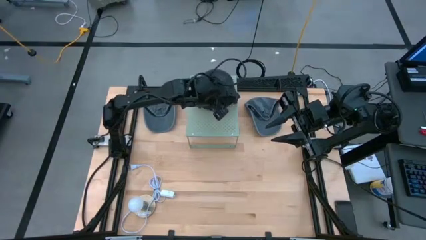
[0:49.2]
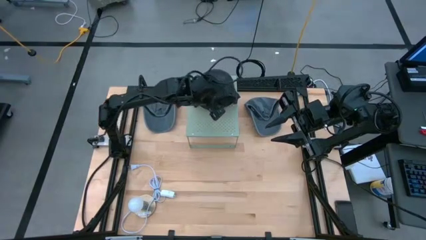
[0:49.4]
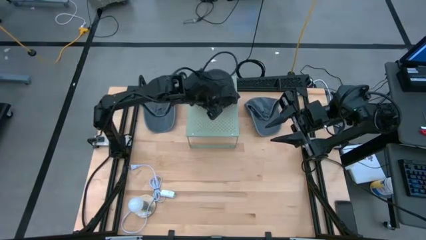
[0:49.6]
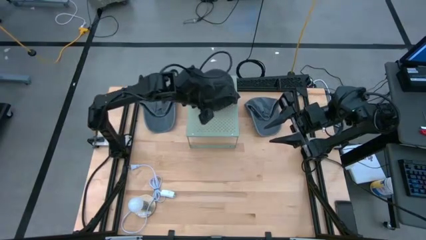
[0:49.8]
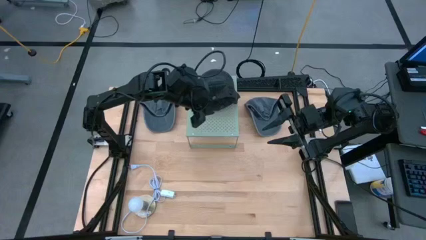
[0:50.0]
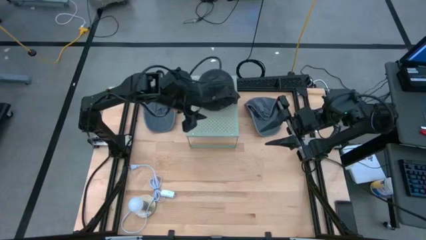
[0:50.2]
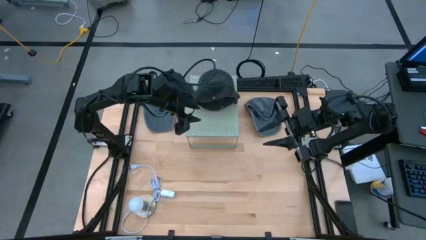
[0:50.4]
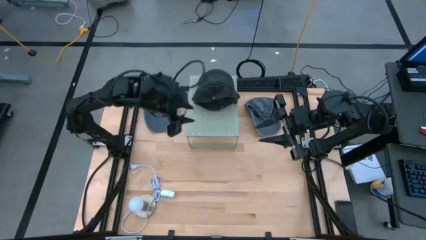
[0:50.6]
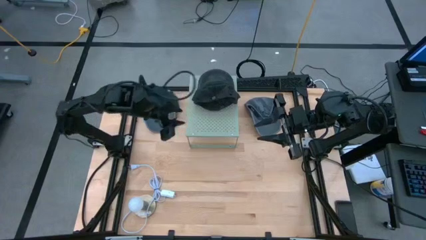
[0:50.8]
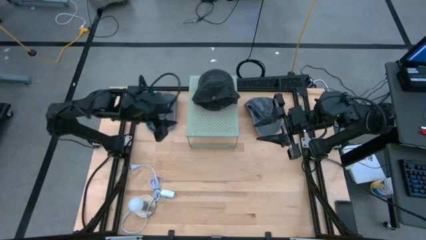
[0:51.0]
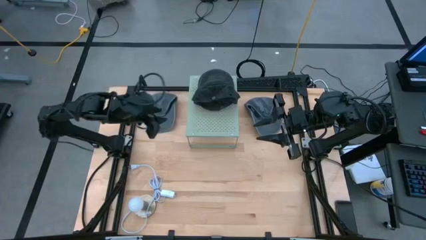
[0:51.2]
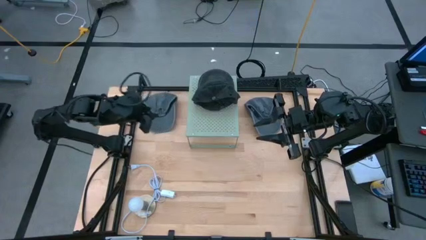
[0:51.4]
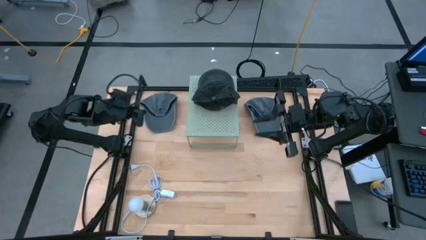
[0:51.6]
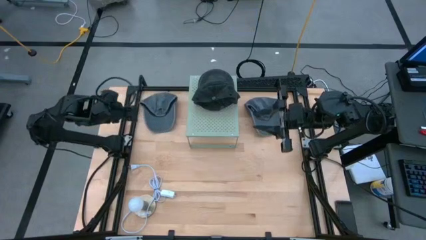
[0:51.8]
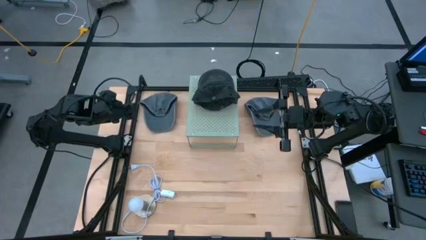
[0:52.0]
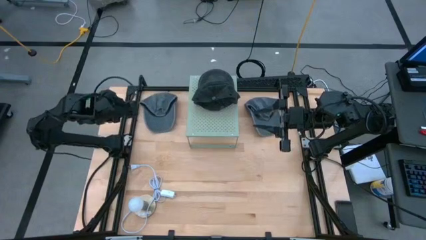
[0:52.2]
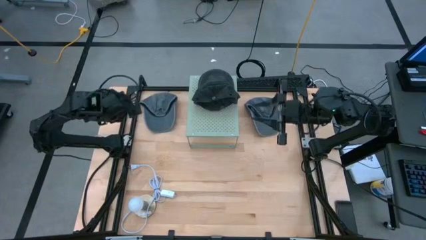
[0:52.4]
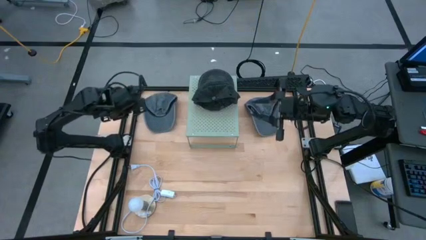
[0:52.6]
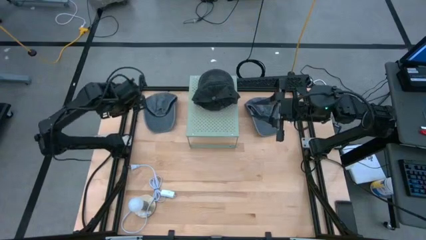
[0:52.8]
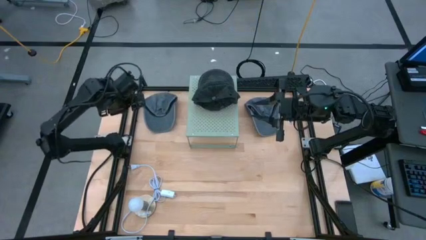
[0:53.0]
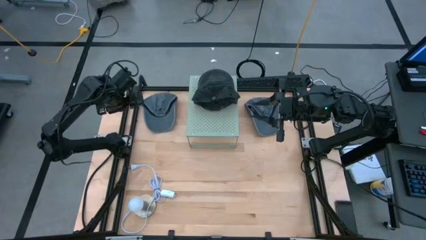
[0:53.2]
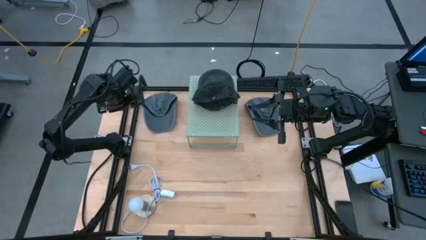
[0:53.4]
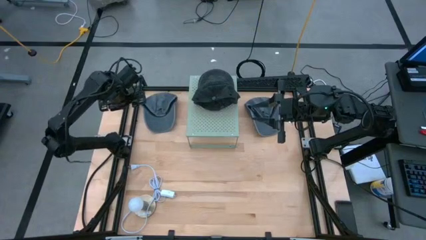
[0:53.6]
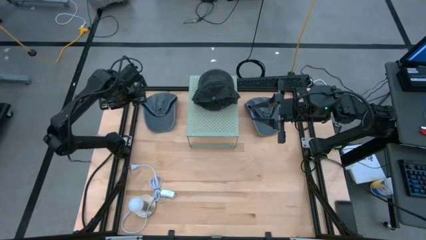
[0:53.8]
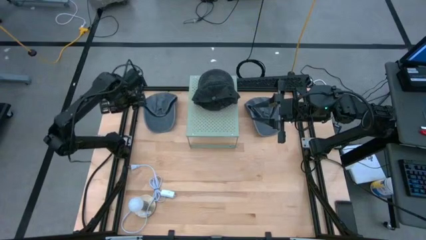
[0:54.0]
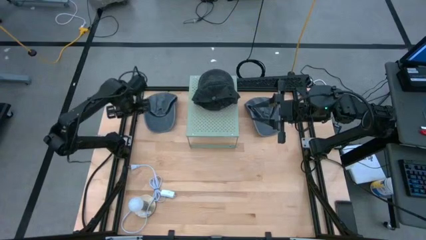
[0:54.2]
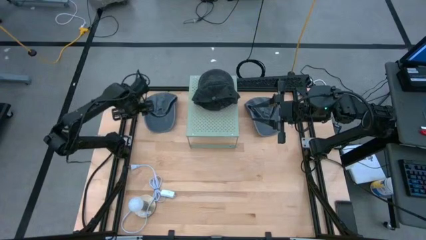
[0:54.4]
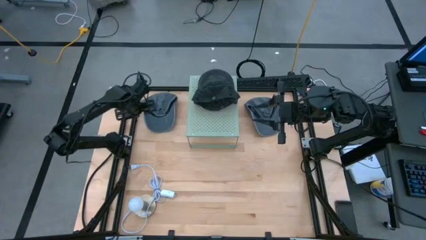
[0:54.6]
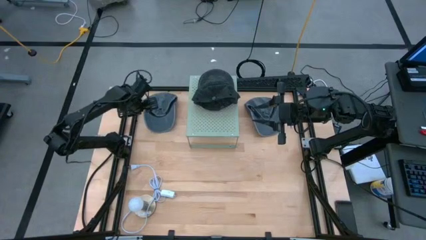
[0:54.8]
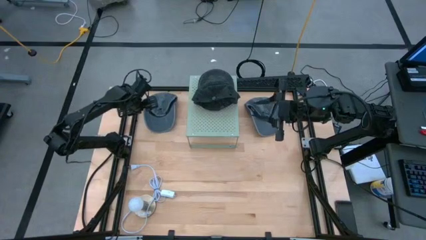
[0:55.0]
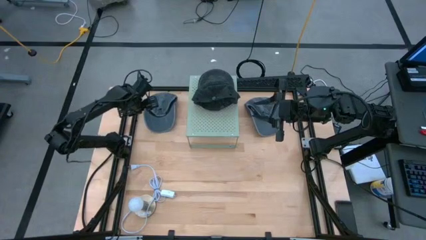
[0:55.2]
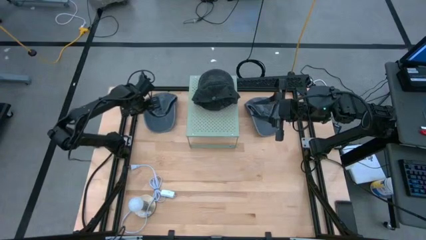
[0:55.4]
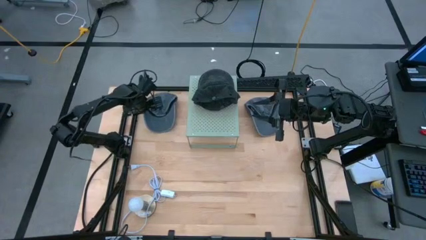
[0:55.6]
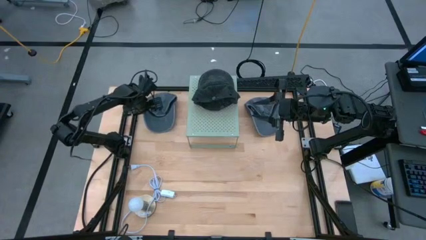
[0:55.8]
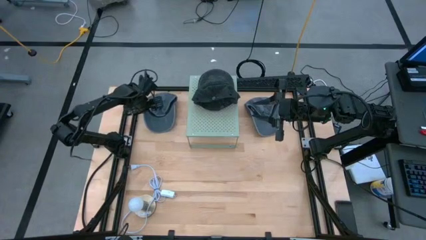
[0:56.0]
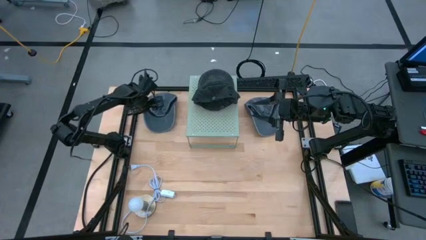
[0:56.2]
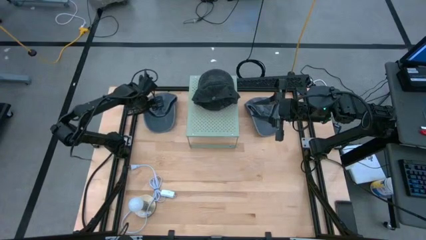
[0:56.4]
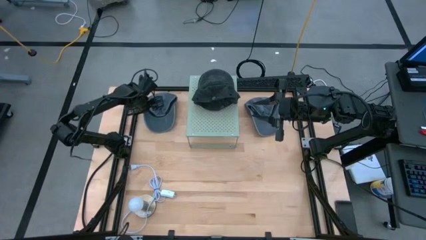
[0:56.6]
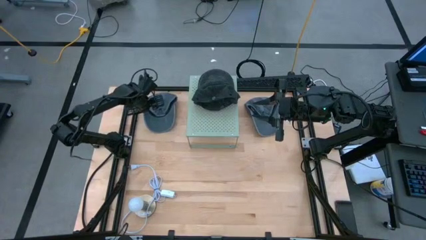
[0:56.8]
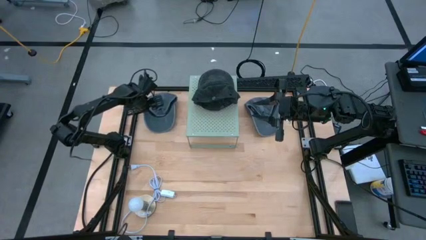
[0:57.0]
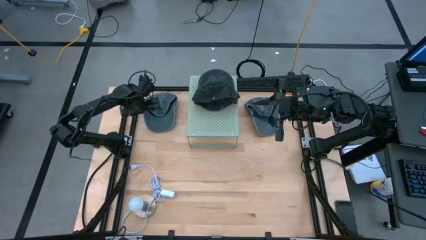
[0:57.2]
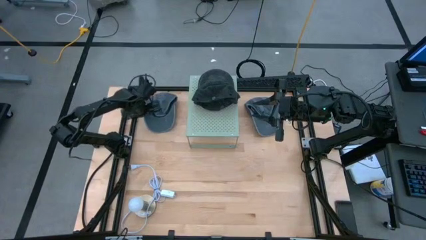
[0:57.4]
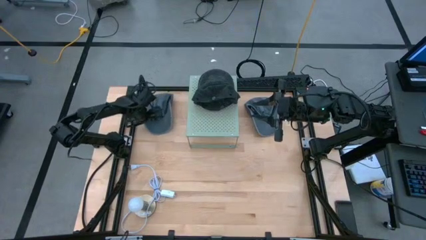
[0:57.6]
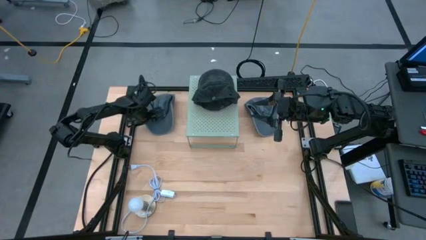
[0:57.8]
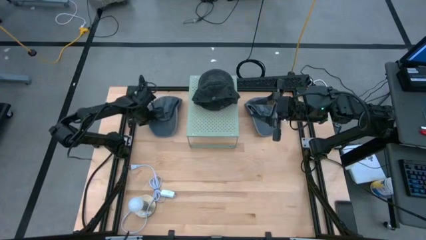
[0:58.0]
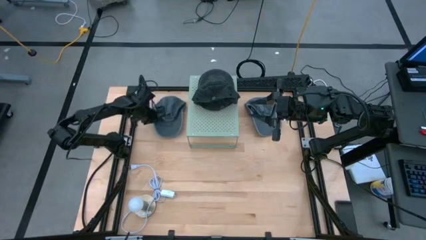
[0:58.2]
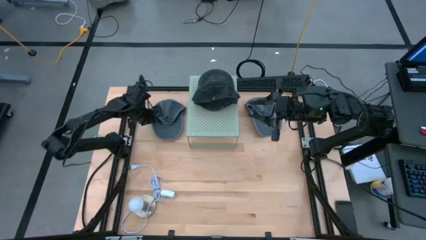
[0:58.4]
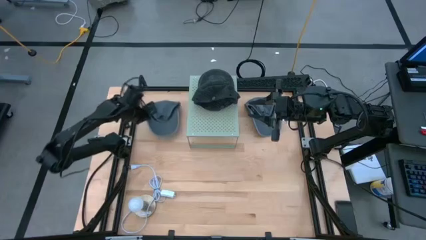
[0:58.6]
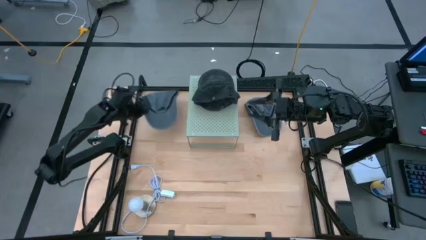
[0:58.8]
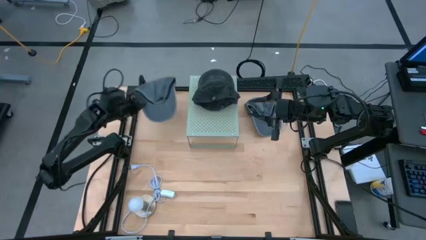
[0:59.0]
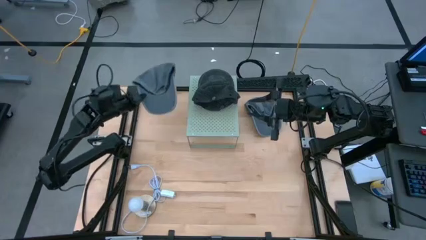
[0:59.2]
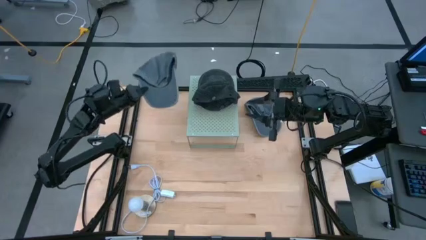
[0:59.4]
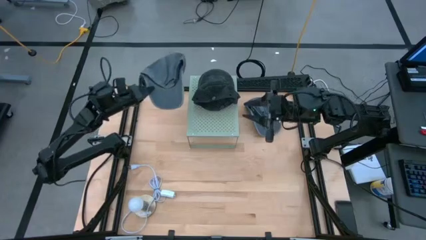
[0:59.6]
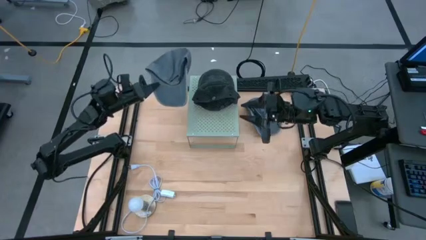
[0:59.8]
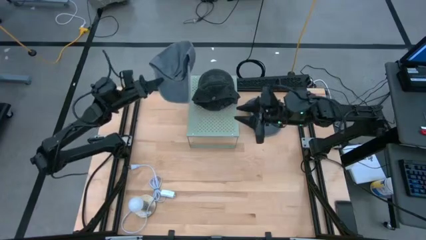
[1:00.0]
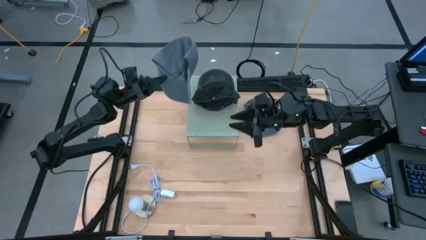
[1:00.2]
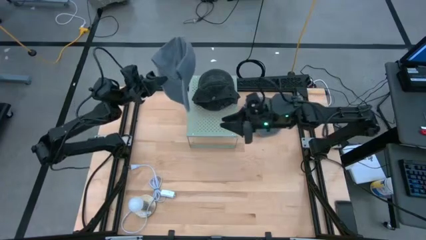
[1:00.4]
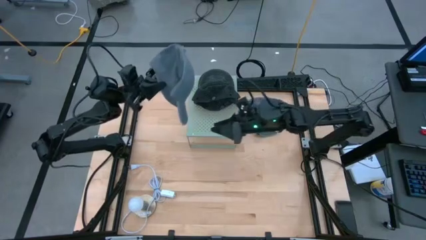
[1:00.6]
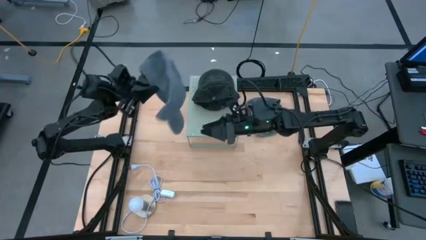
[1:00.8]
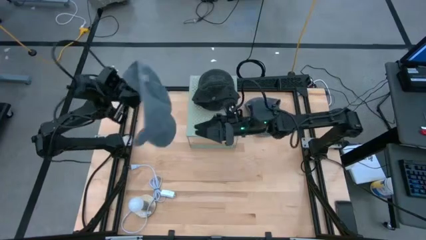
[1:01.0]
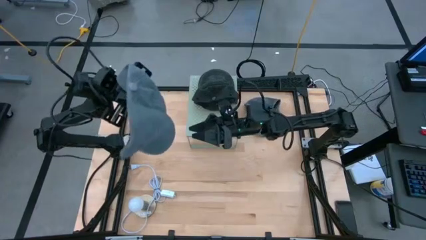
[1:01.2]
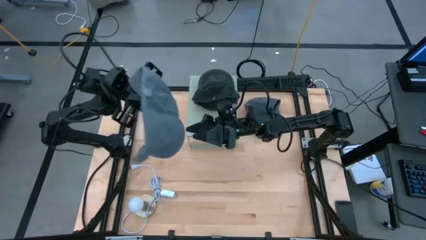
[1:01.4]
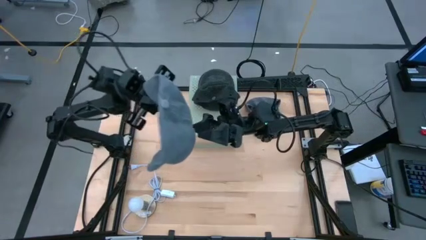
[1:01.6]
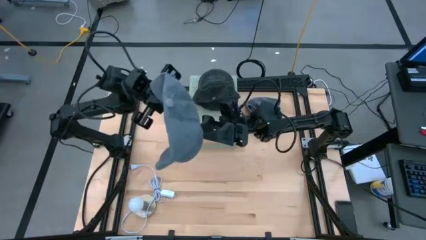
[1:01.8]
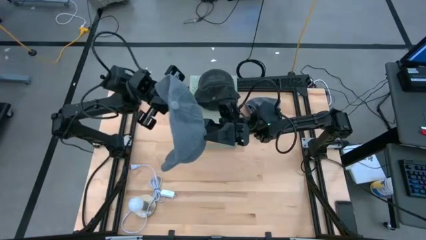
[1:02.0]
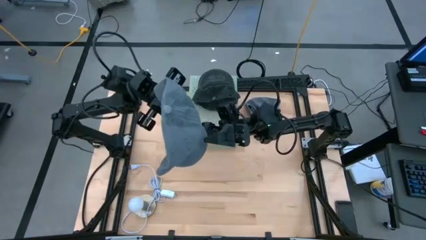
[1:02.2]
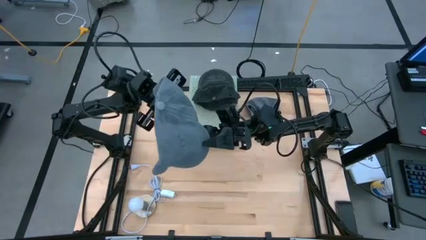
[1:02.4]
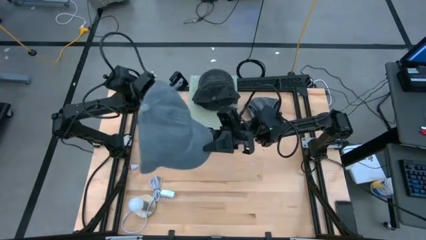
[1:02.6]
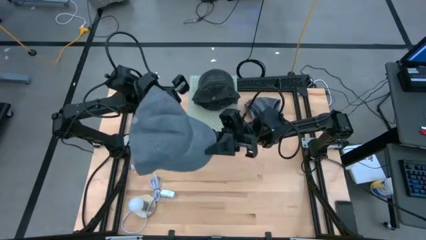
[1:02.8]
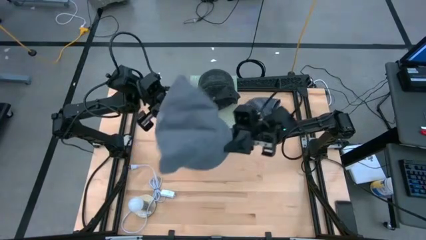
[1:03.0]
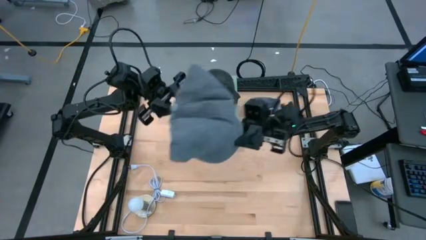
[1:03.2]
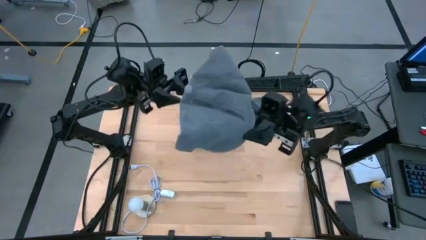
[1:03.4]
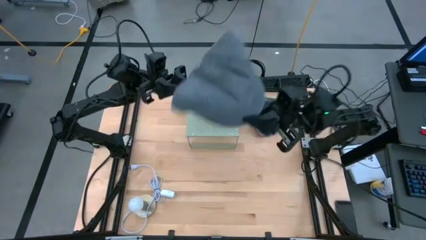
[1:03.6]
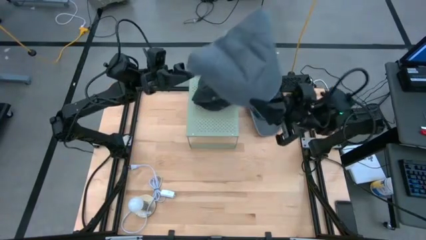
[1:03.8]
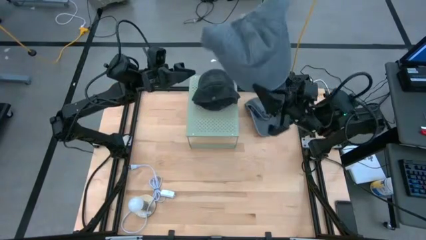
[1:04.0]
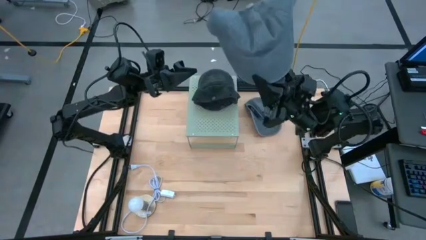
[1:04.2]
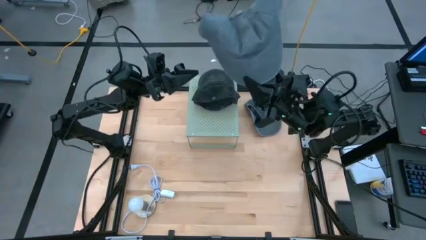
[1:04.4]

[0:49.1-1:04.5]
Task: Pick & Place hat
Put the left gray cap on the shelf
